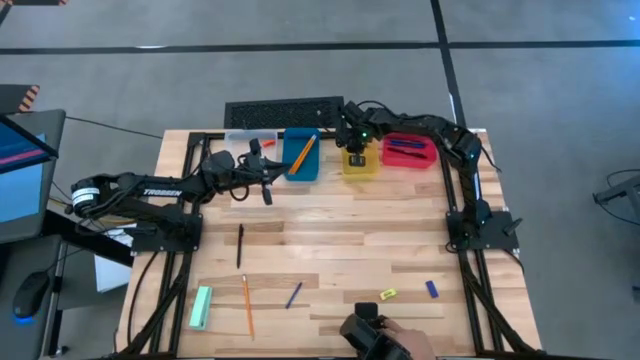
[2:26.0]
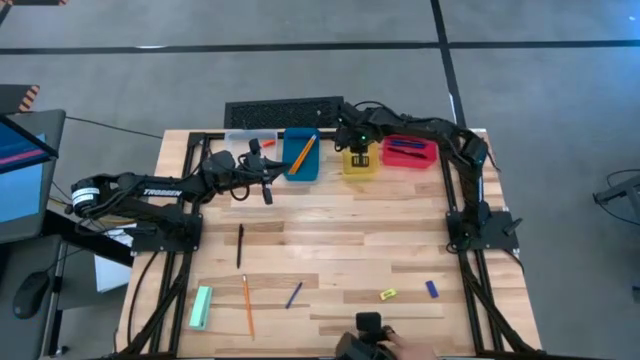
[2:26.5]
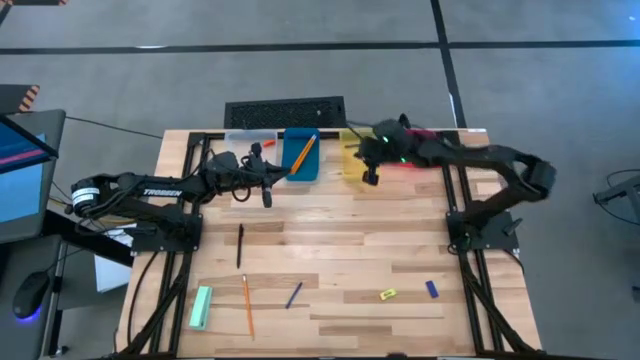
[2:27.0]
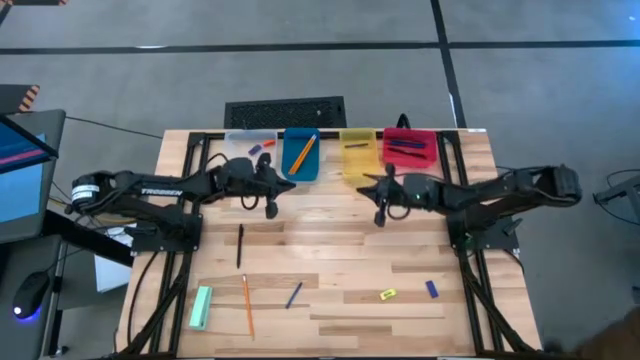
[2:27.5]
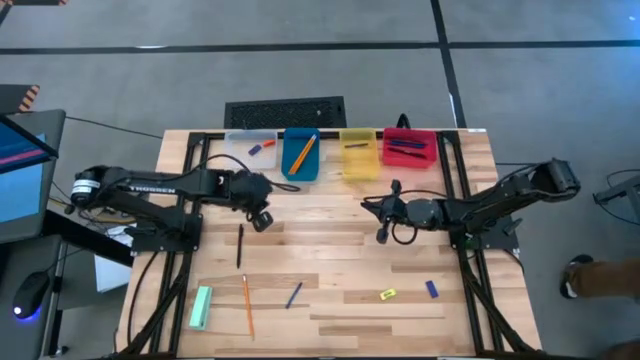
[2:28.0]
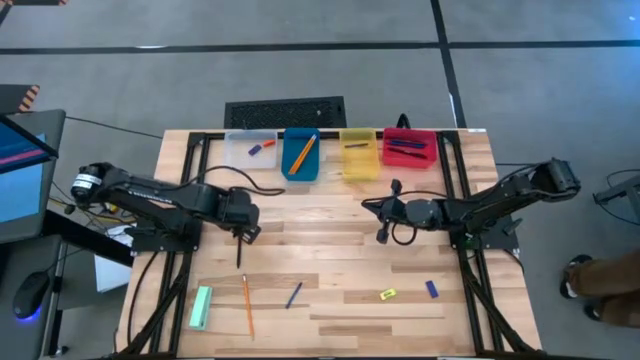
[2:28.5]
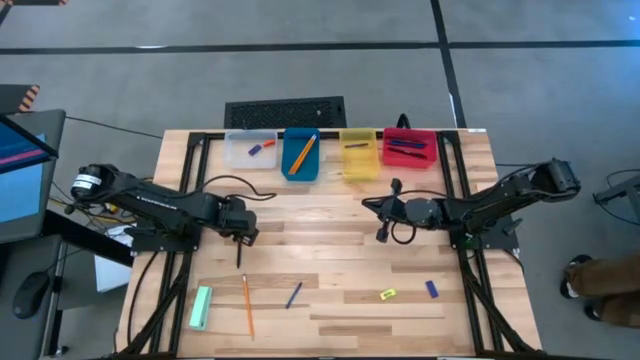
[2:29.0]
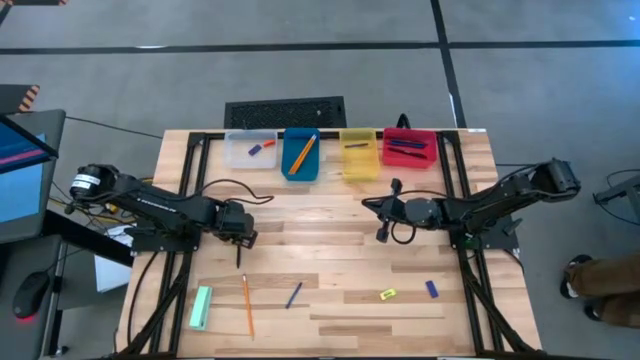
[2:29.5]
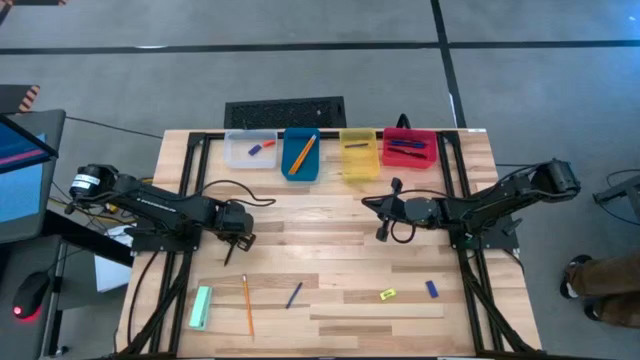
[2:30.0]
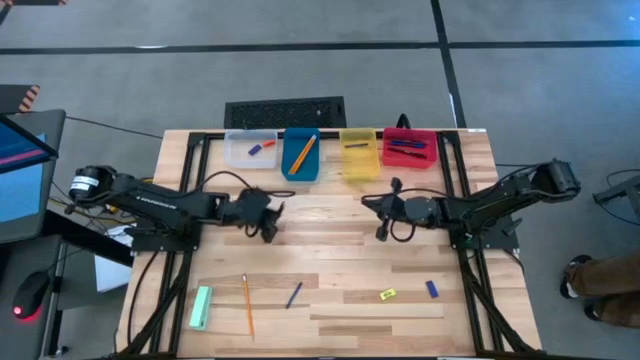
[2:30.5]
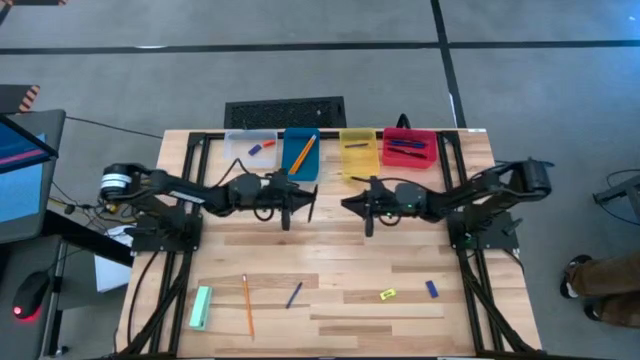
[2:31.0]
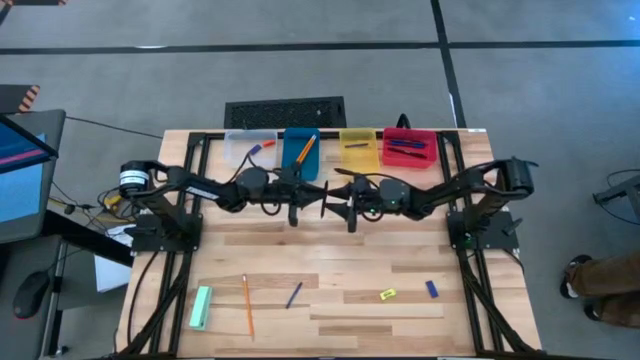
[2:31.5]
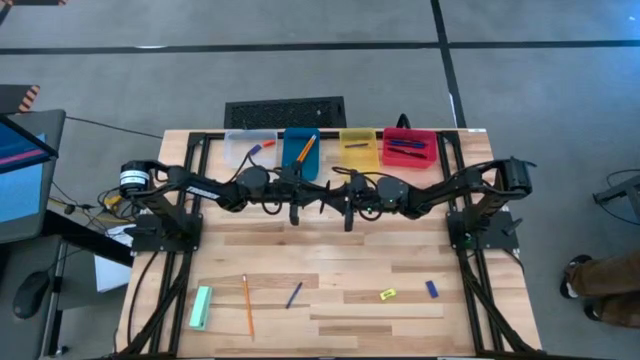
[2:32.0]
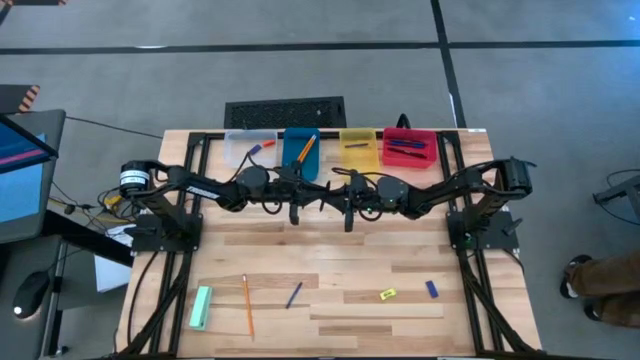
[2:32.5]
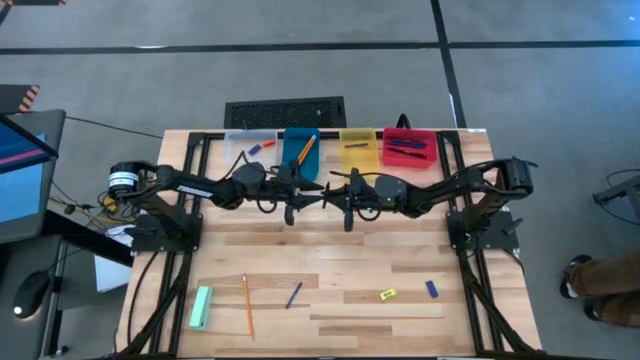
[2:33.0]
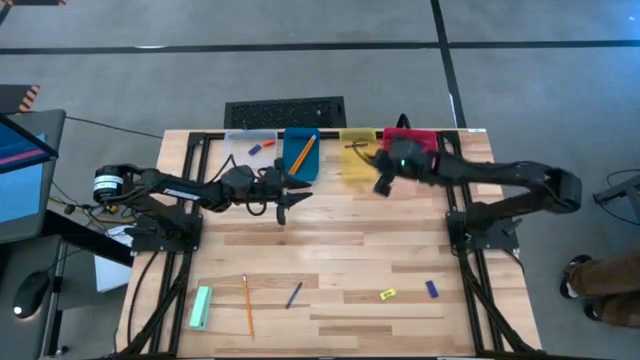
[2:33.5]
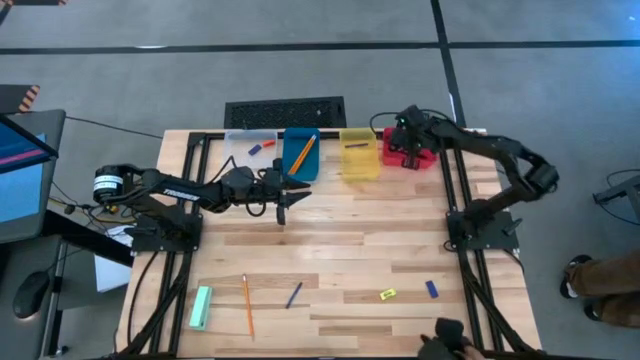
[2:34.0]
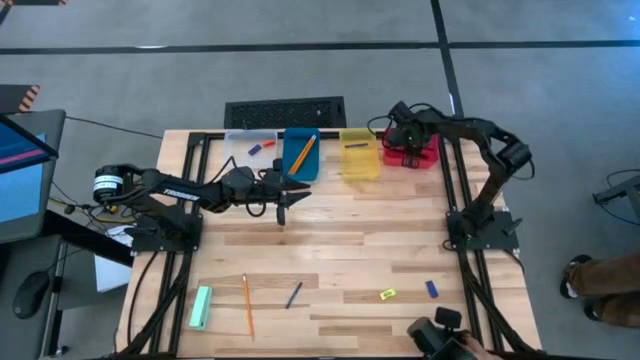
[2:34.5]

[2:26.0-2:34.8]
Task: Sort crayons/erasers/pens/pencils in bins
Put the black pen into the red bin

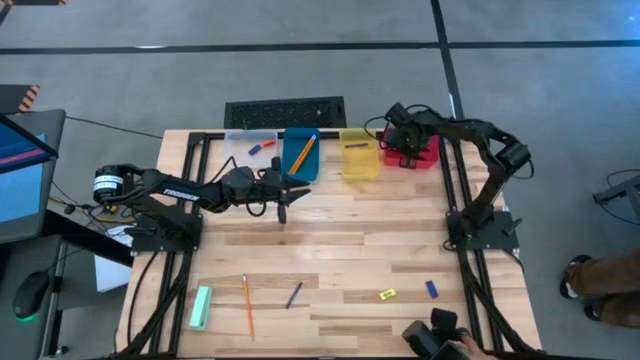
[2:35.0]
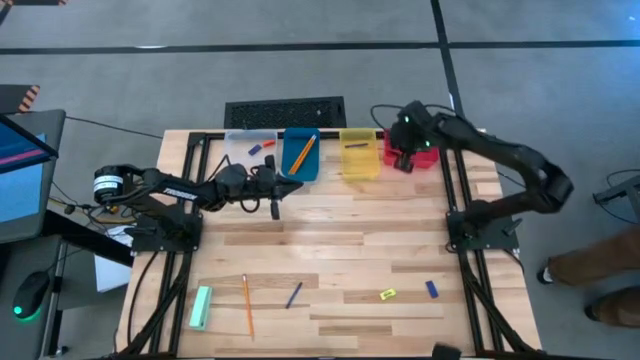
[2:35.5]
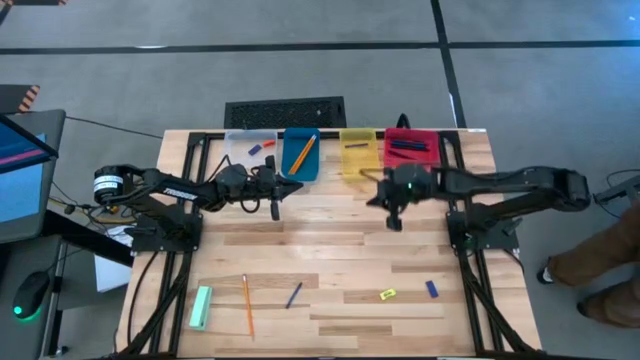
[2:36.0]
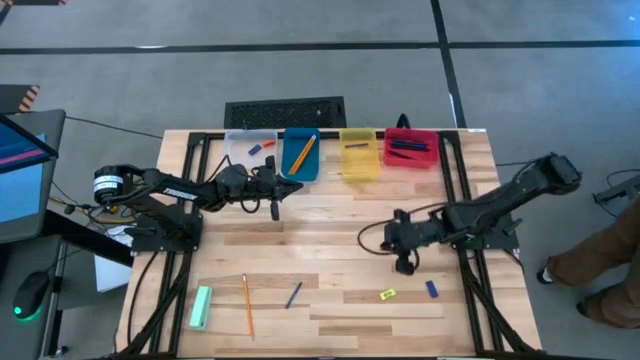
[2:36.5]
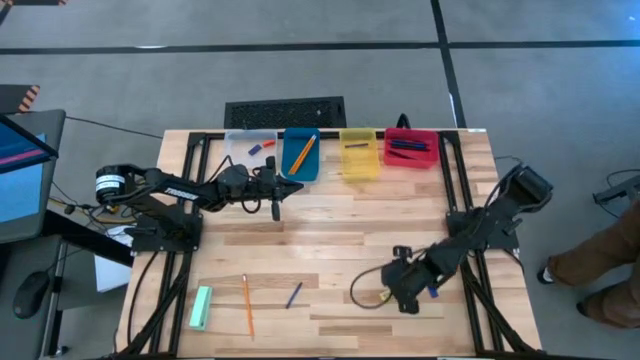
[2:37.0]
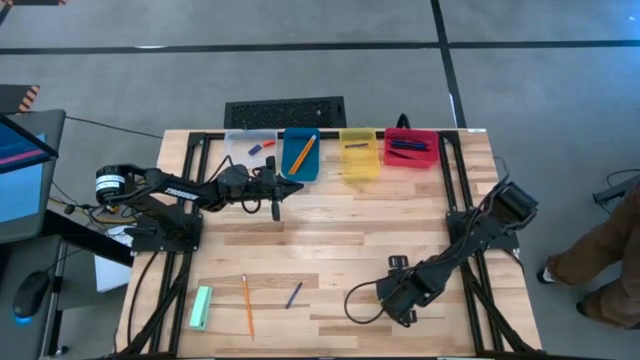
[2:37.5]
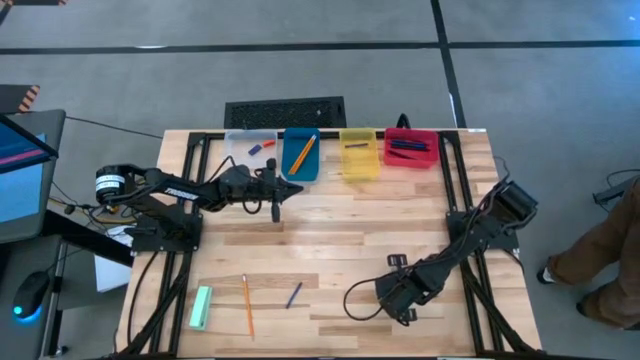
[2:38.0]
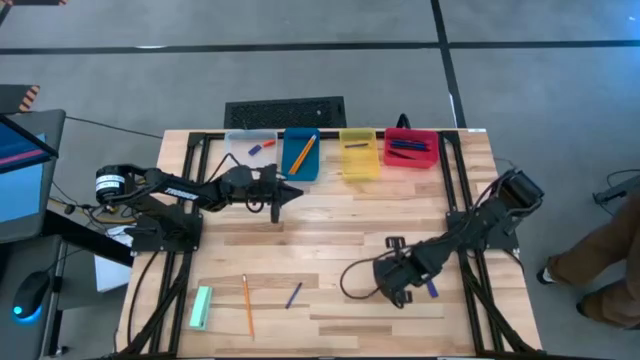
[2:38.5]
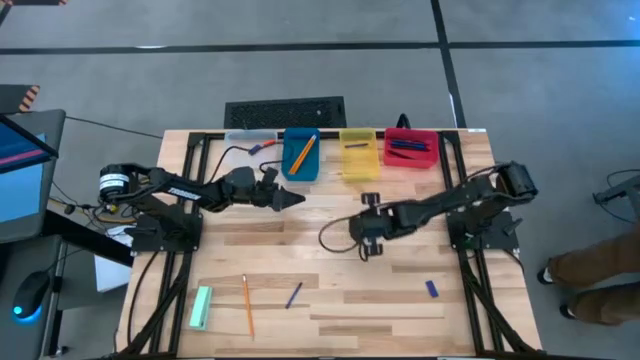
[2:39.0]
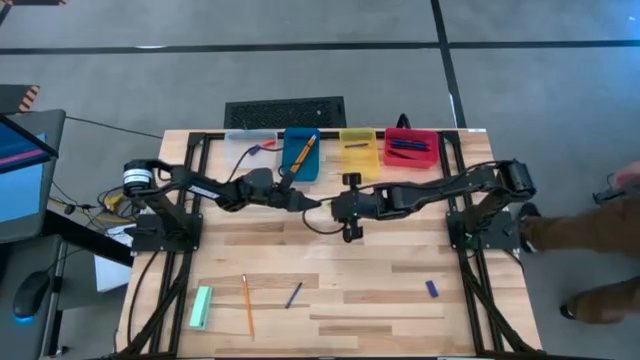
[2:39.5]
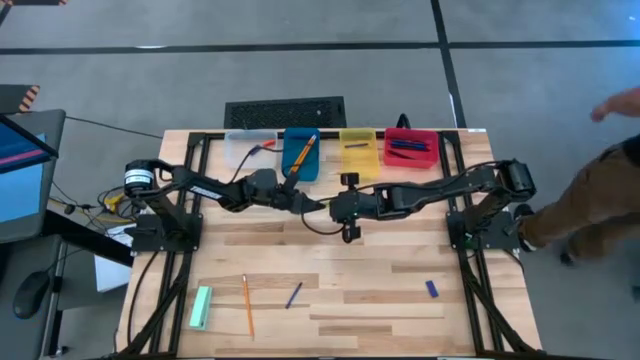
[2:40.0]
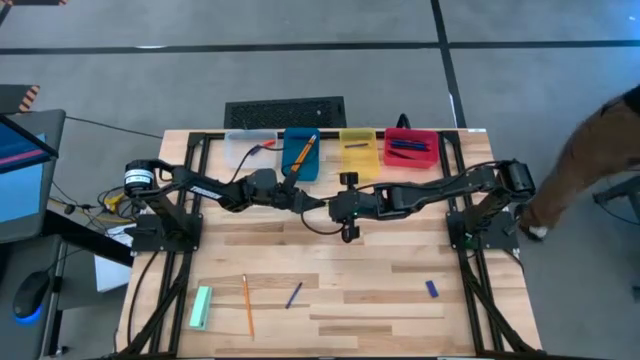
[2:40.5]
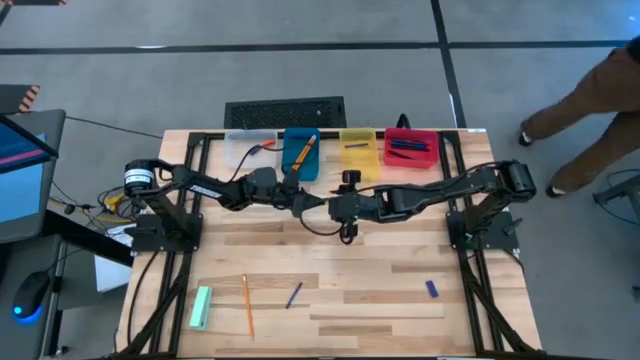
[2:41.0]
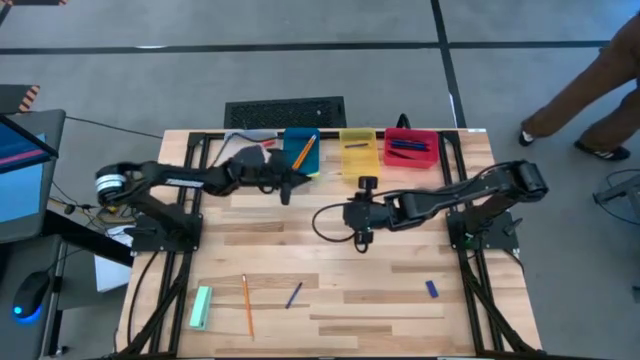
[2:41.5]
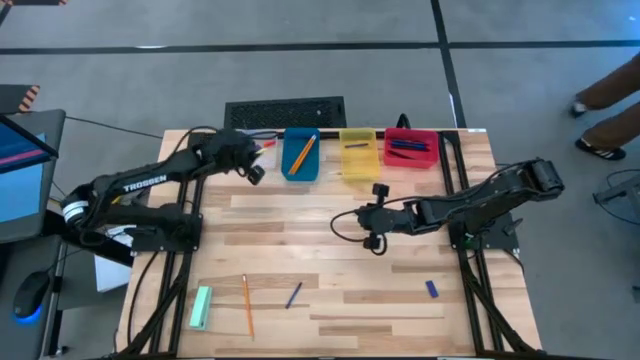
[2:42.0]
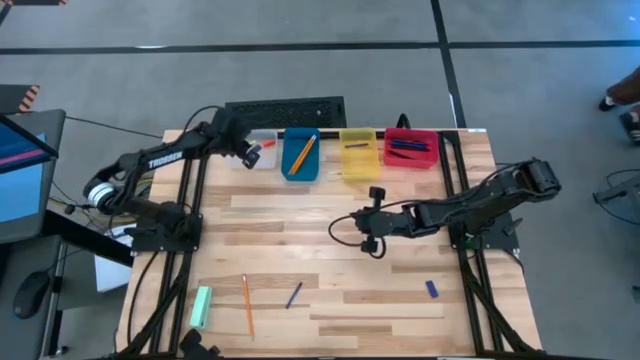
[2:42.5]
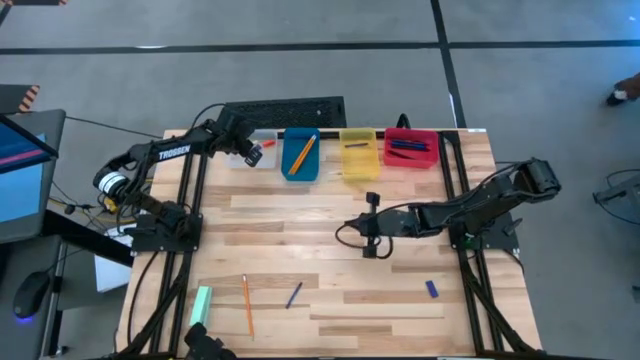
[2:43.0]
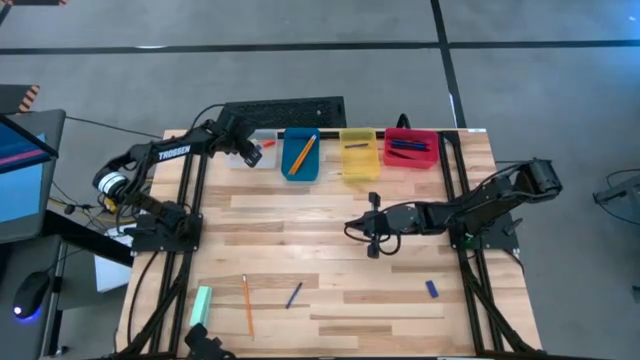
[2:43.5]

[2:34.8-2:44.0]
Put the green eraser into the transparent bin

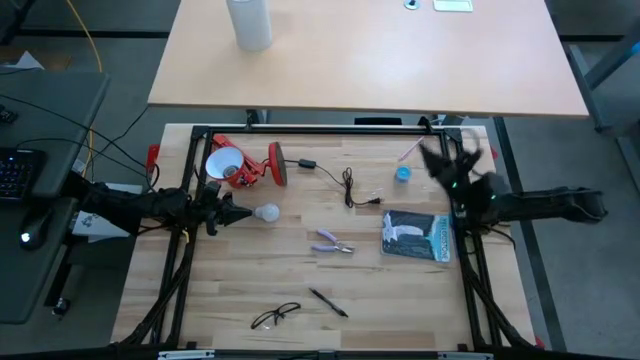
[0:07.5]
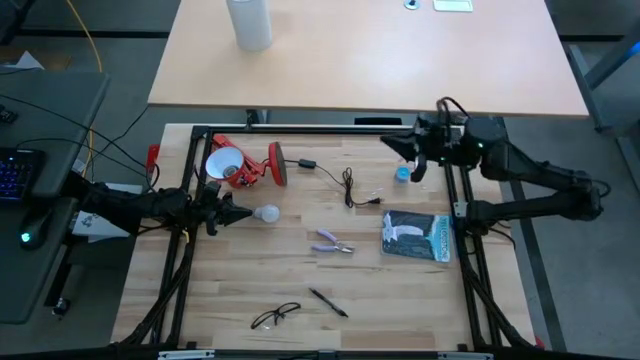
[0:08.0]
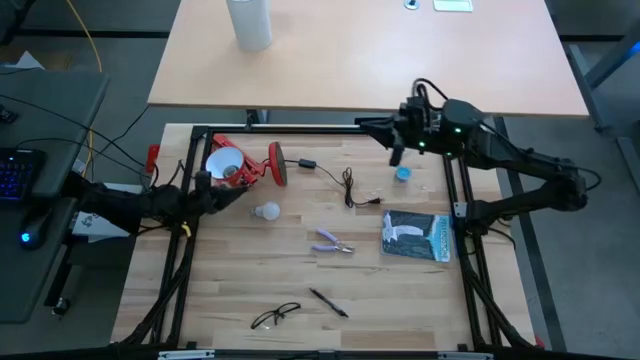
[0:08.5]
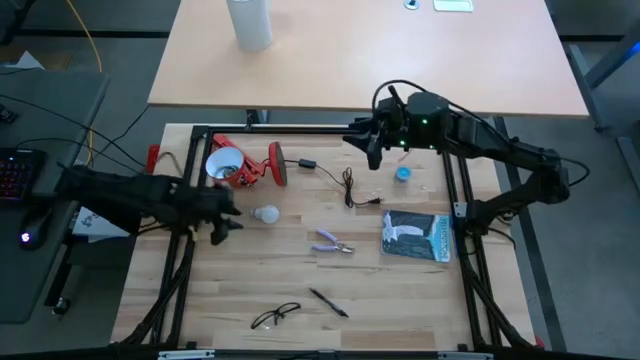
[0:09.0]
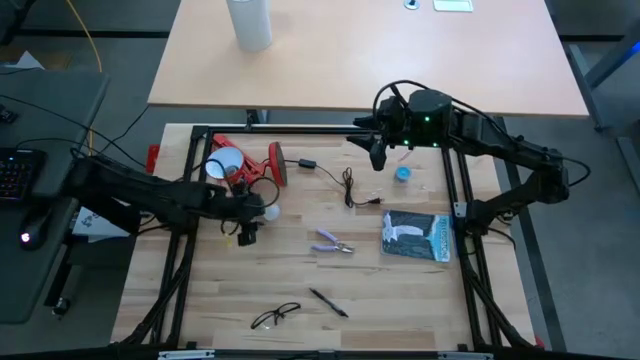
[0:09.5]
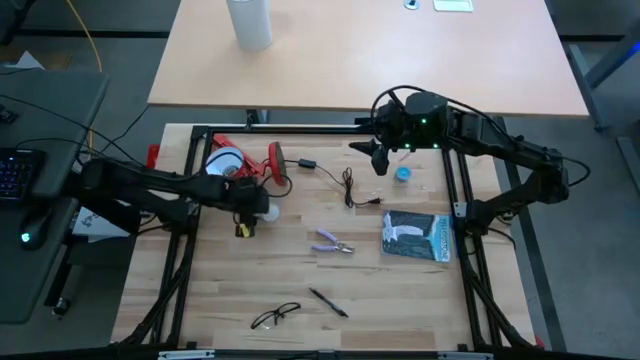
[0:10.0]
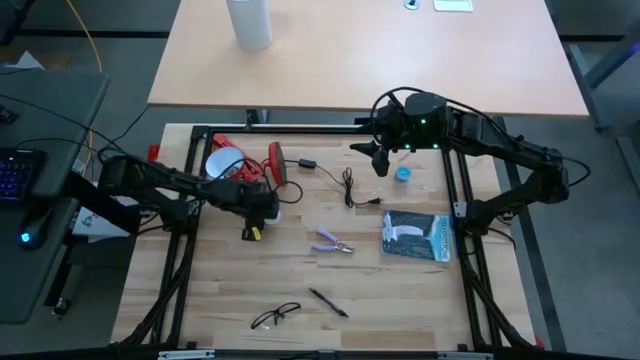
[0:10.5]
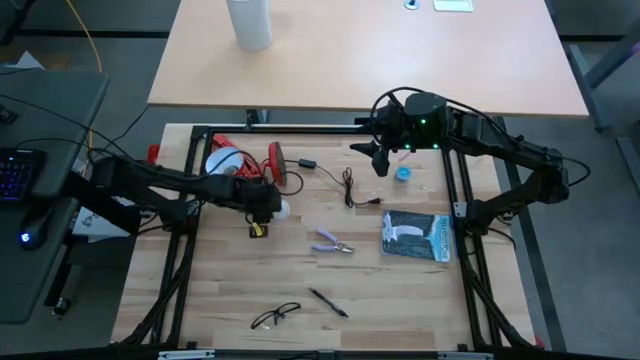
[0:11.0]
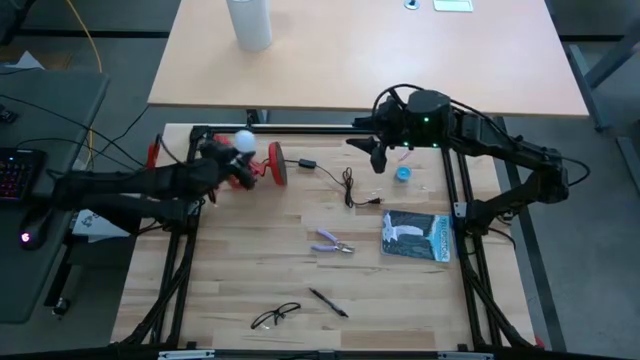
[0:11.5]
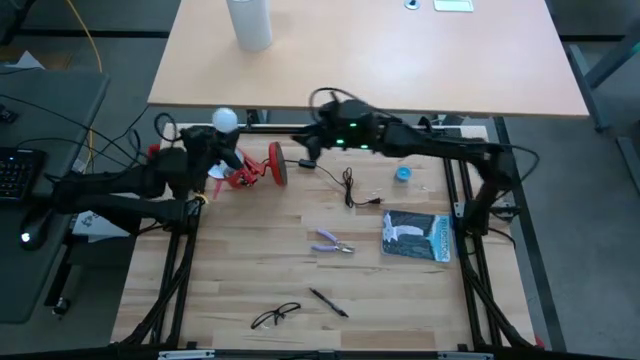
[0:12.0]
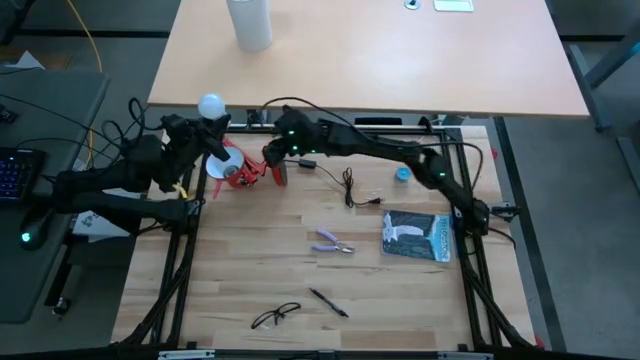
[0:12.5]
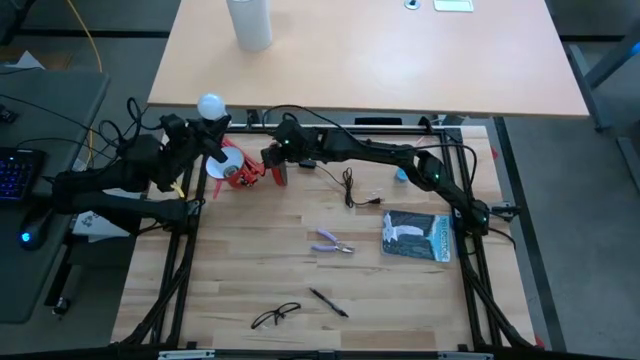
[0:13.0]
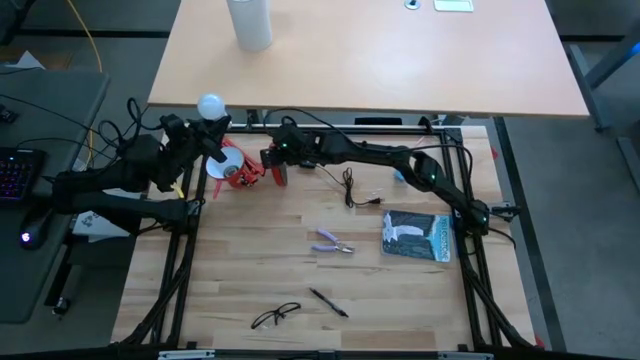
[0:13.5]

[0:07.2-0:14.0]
Task: Screw lightbulb
Insert the lightbulb into the desk lamp
